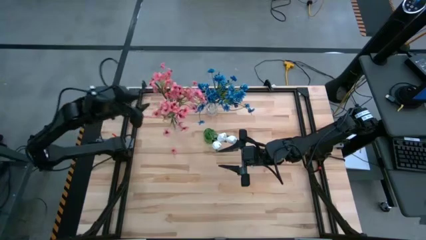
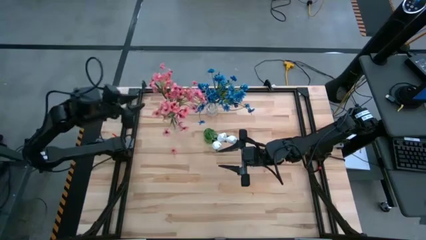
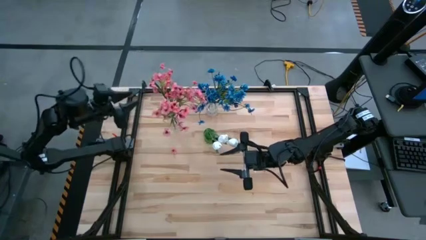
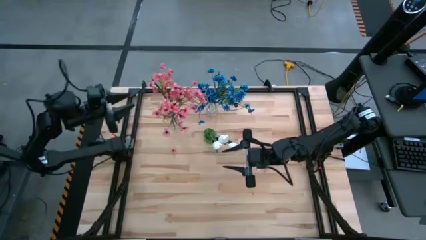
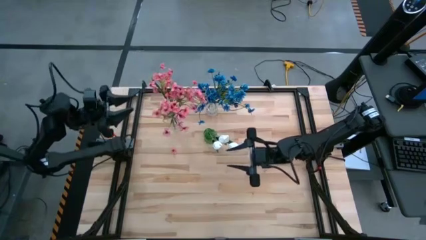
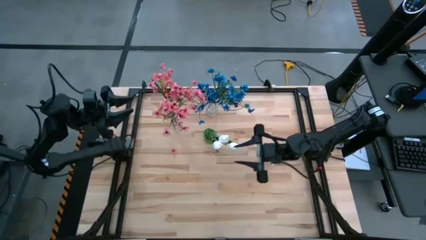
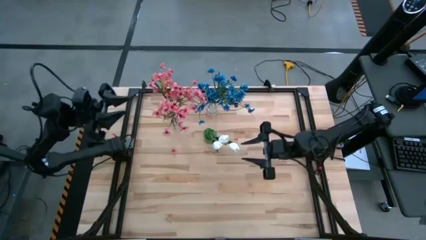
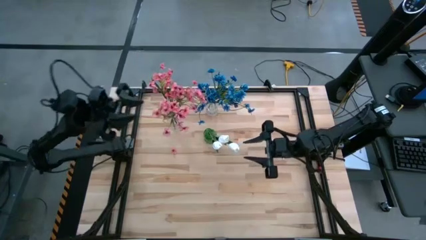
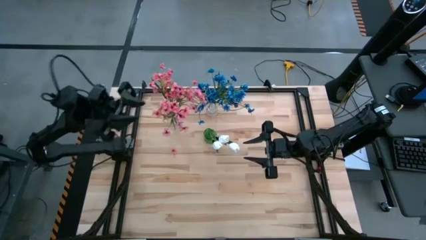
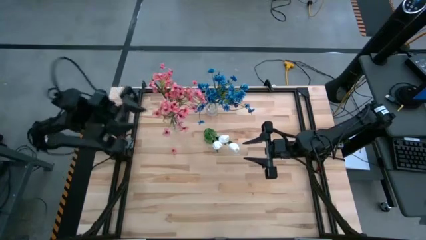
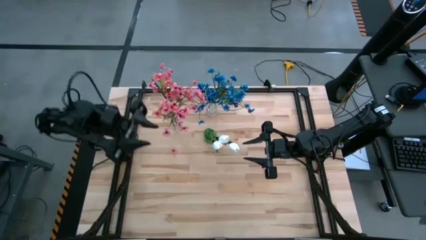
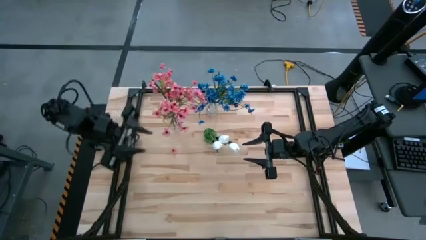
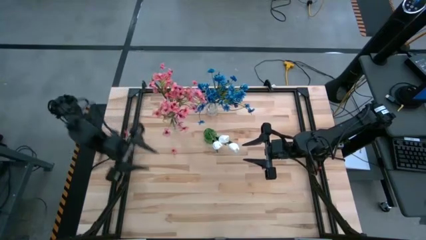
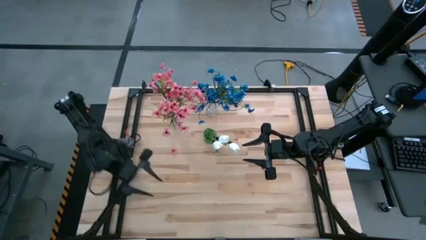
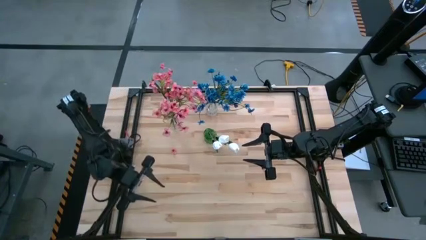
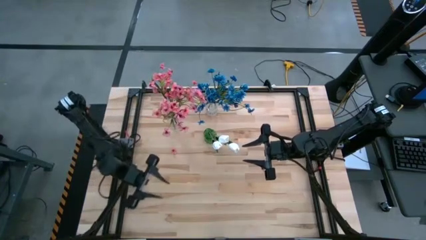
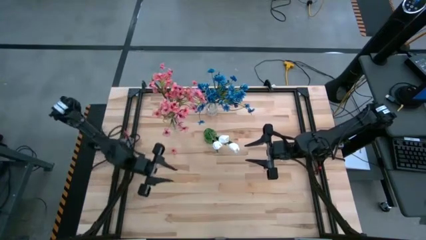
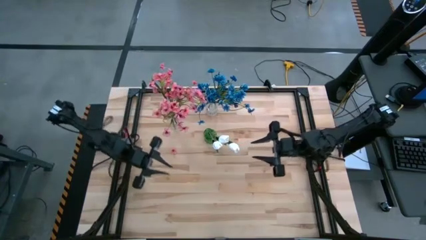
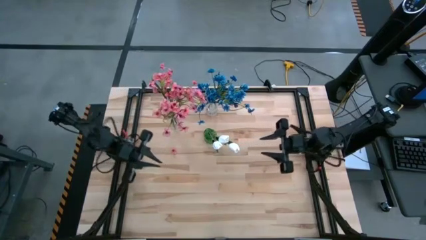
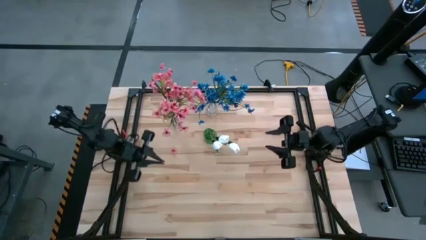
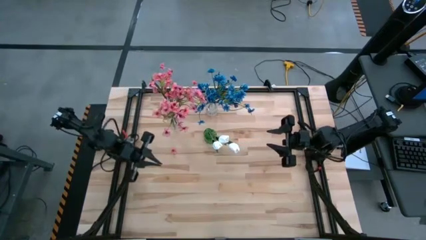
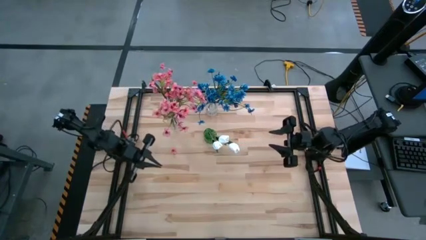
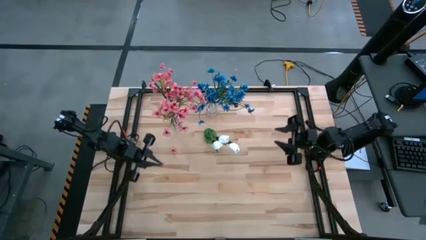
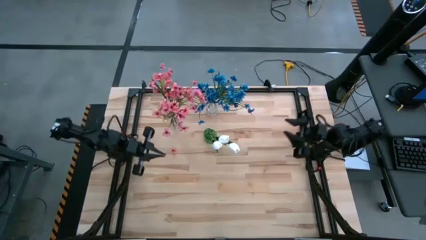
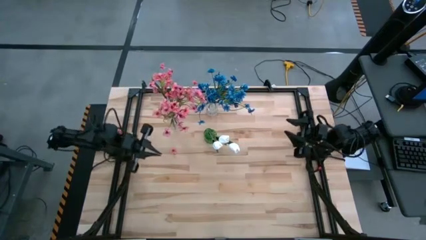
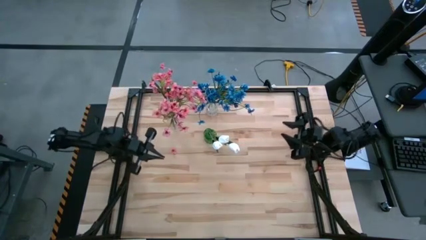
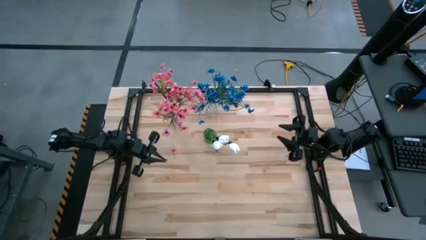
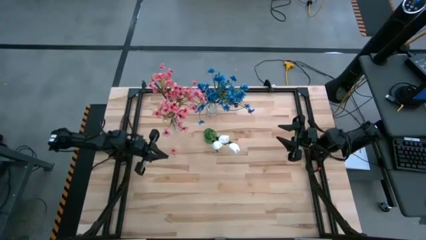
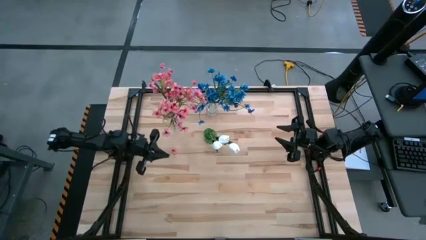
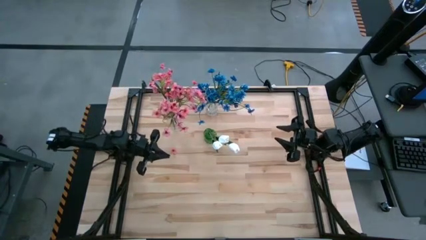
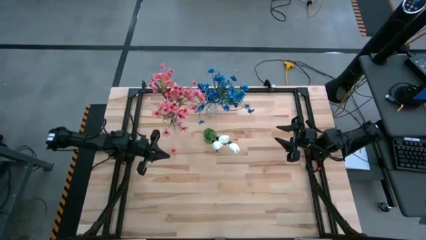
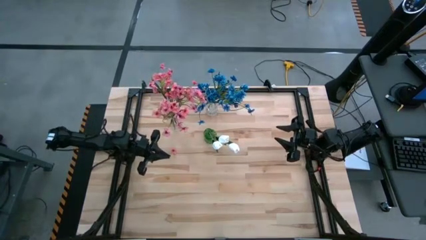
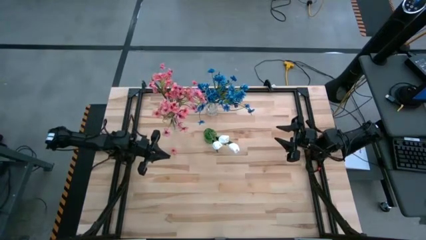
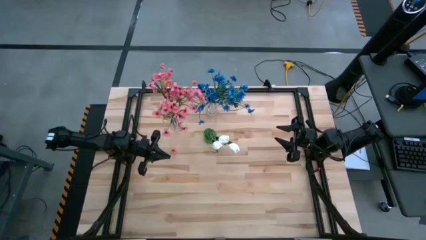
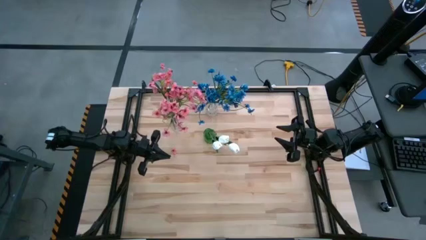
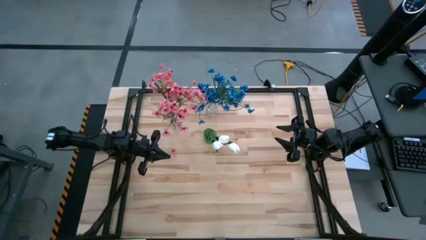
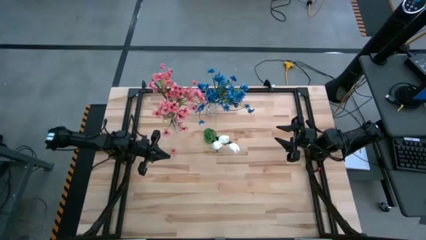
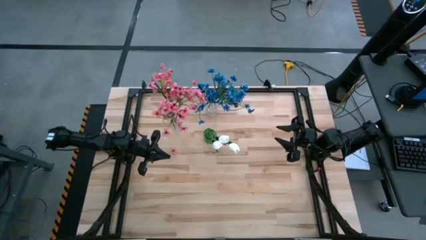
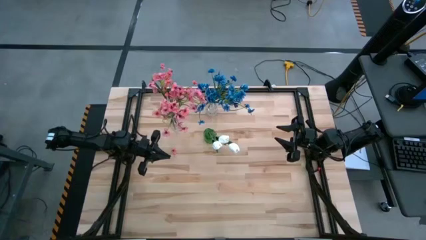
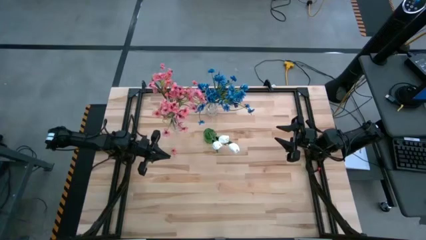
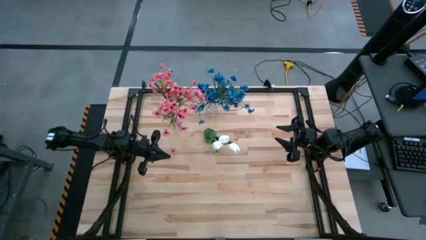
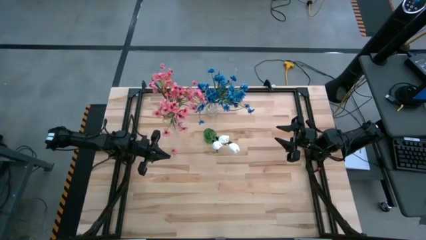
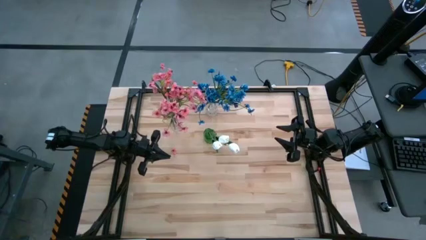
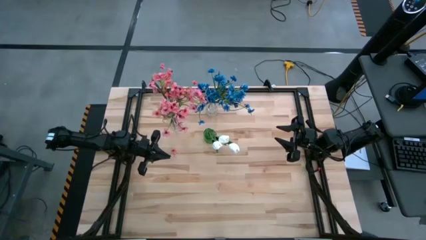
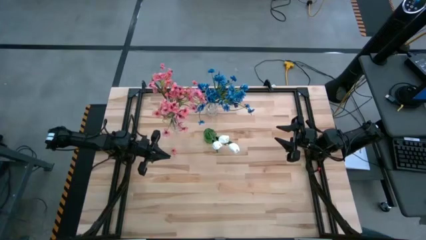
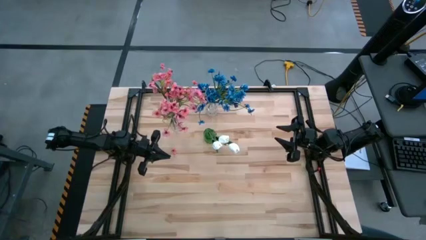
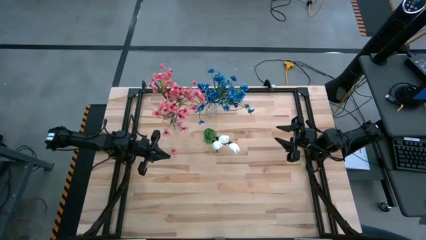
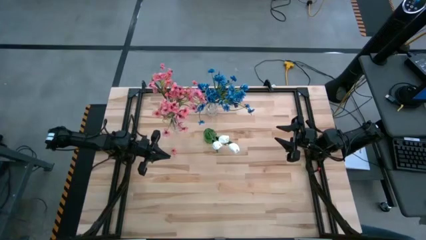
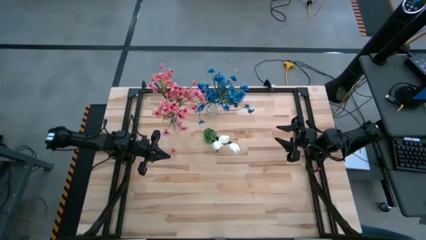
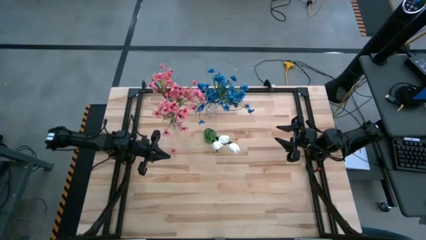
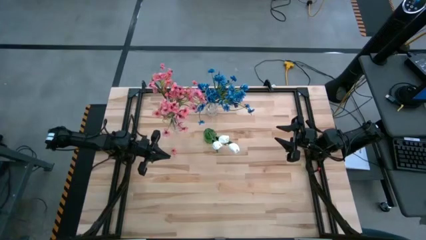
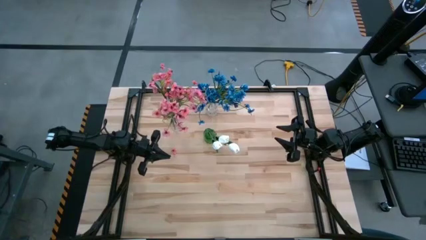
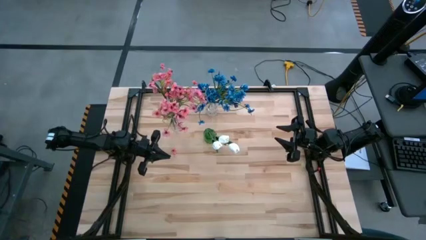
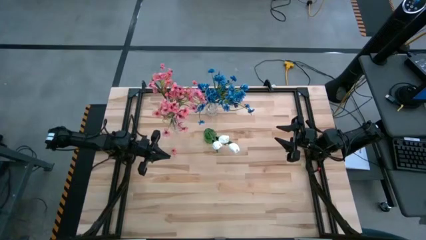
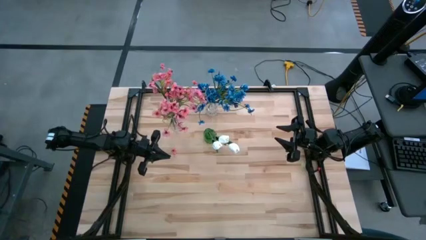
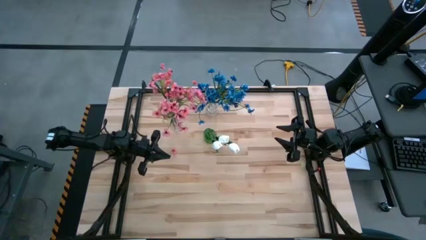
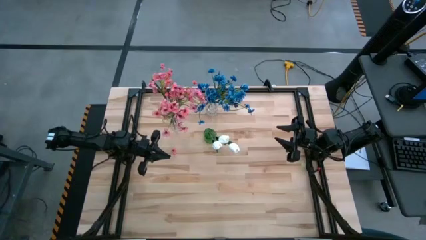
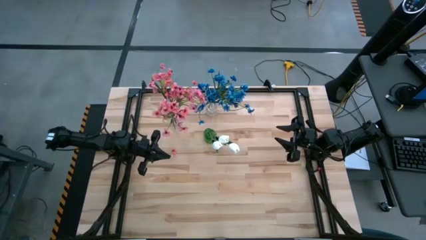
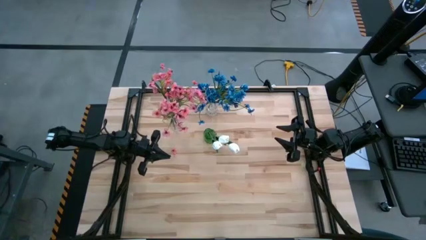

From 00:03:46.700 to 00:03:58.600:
Task: Sort flowers into vase by color
Return to Home Position

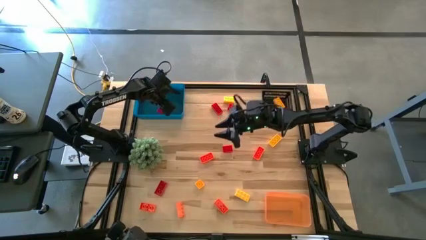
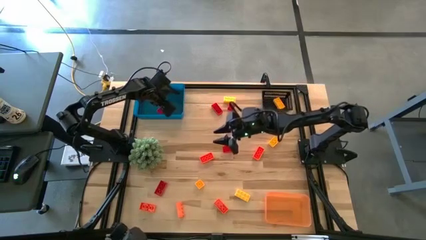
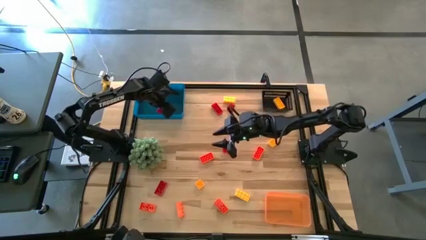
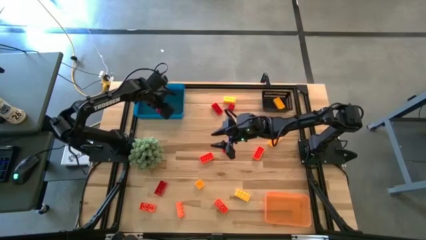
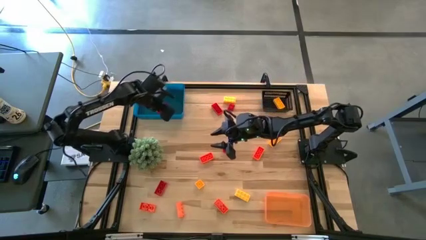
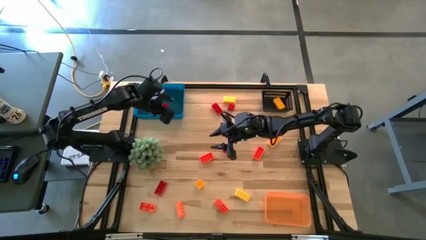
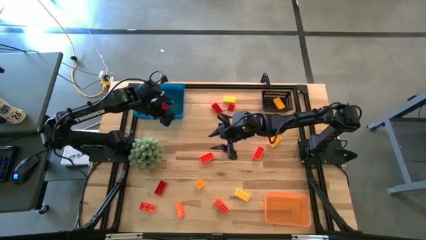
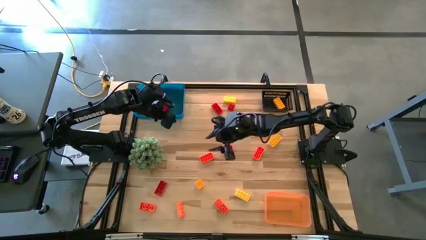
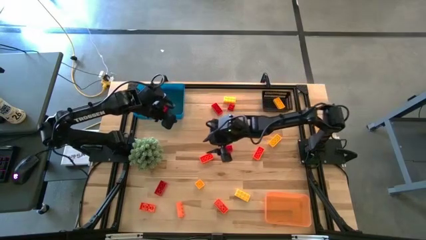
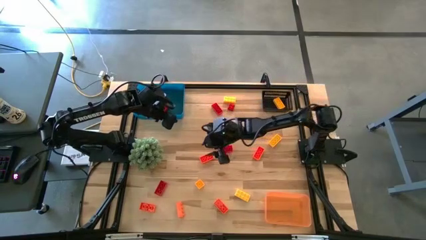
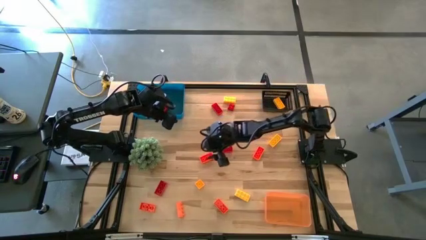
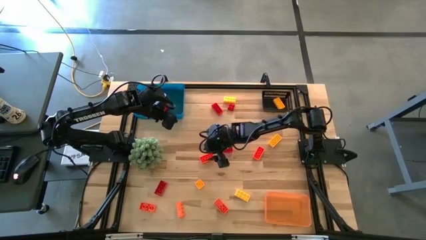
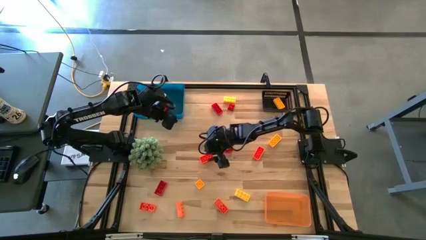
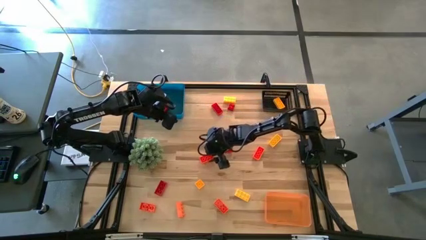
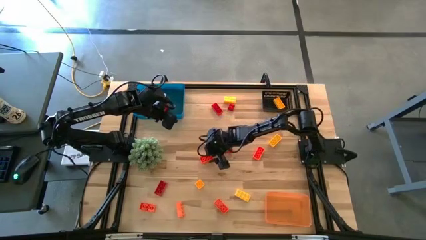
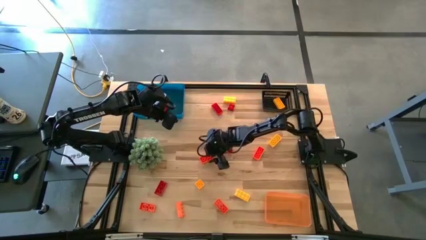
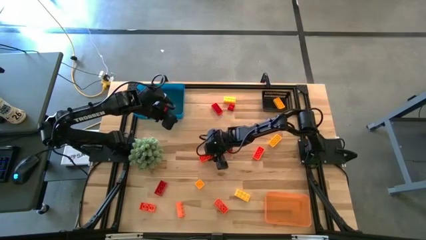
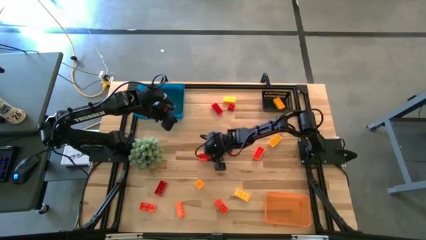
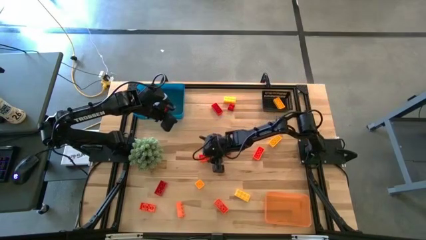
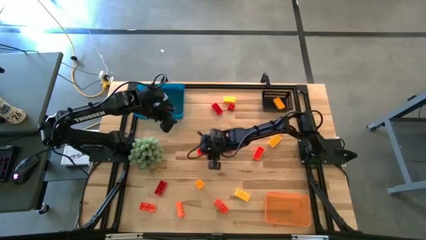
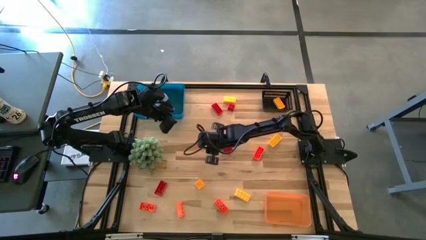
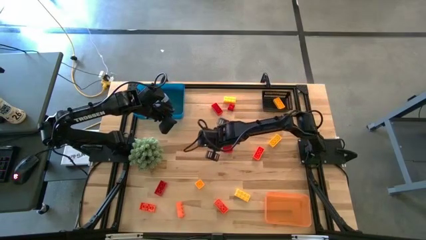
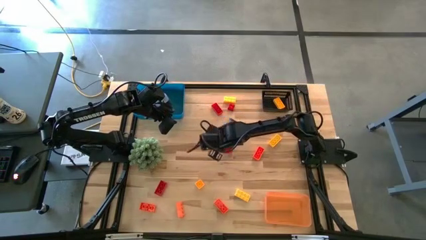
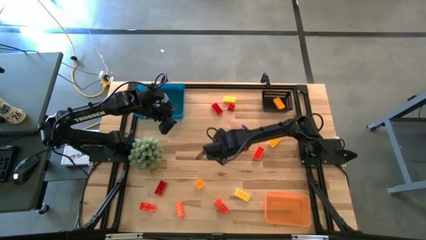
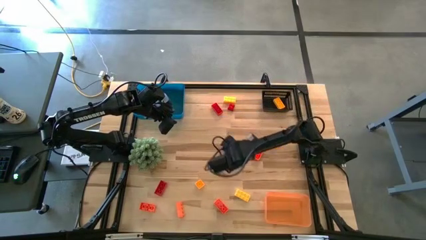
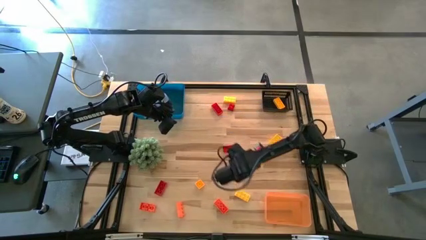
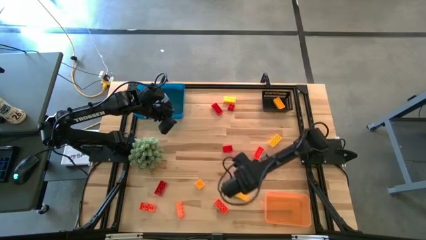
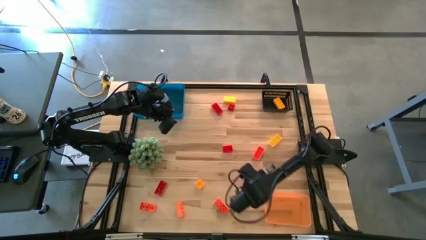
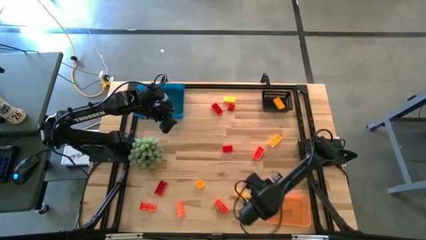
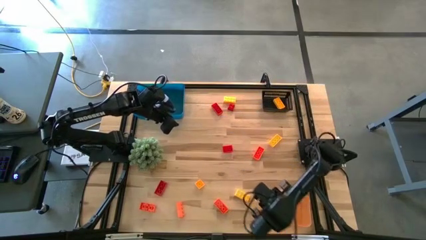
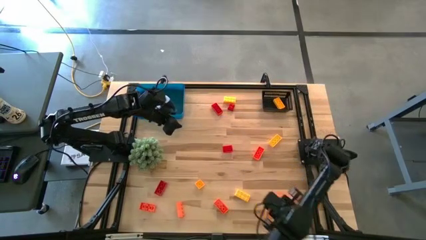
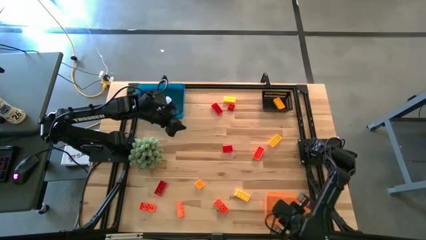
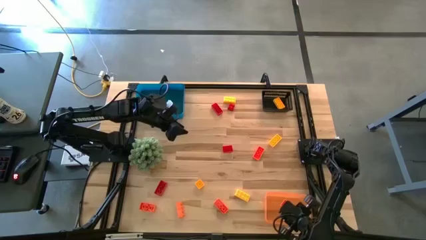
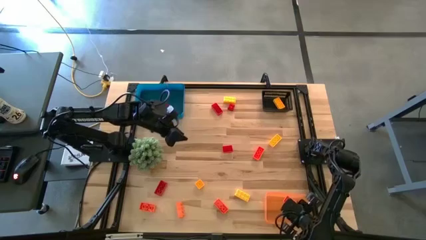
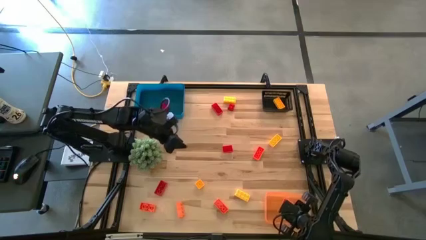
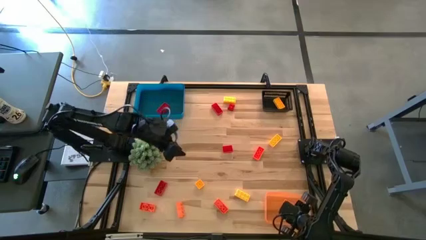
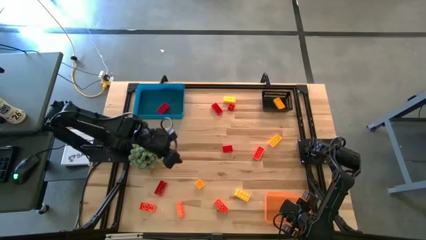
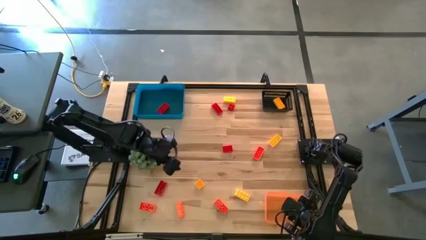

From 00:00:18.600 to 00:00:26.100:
Task: Sort & place blocks by color
Put the orange game piece into the orange bin
